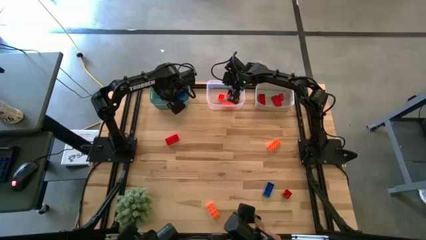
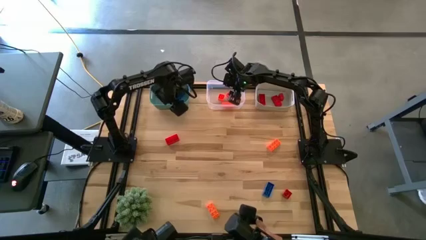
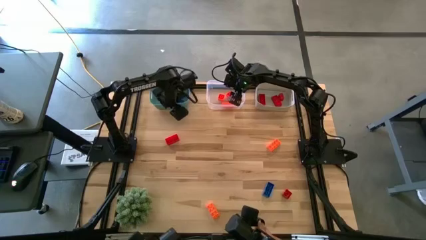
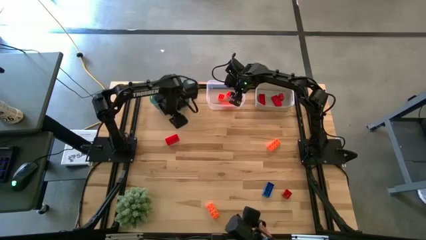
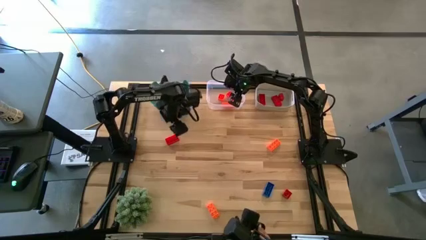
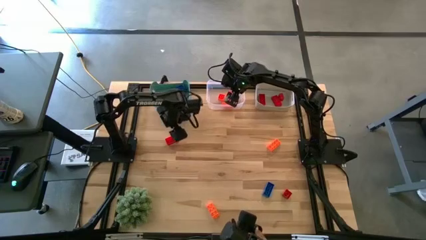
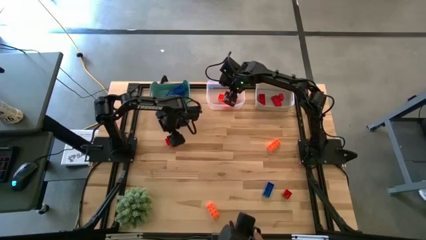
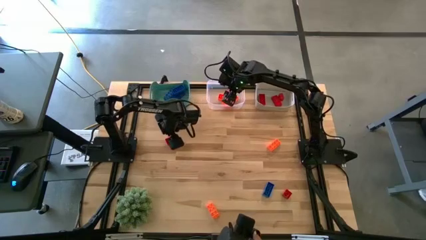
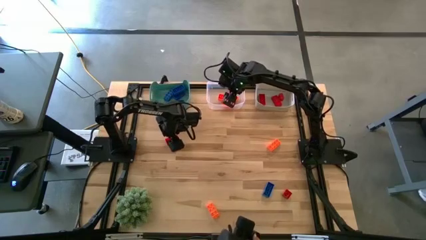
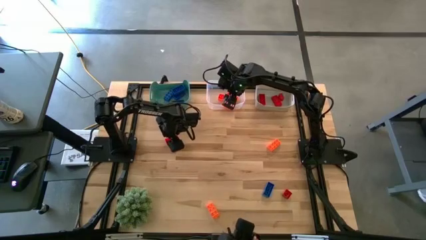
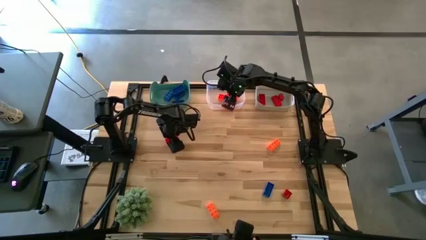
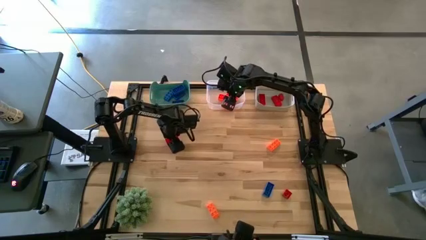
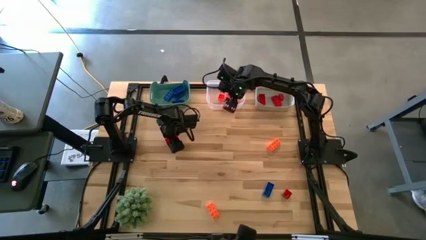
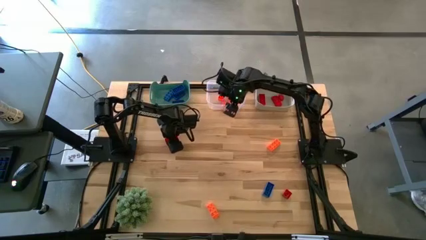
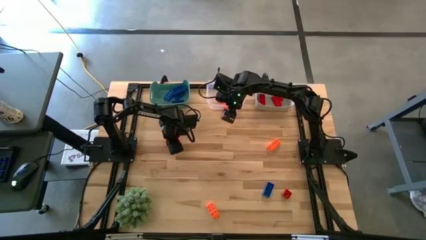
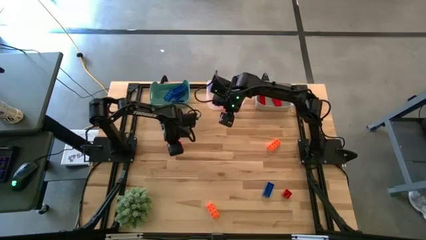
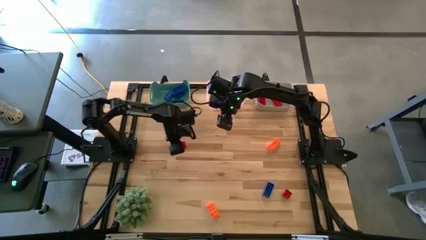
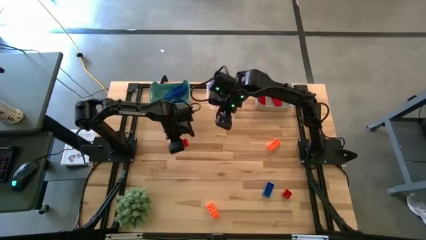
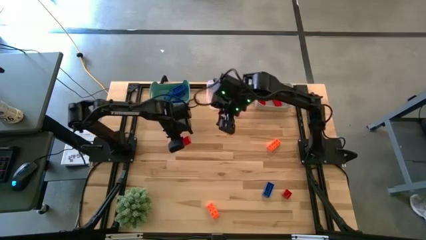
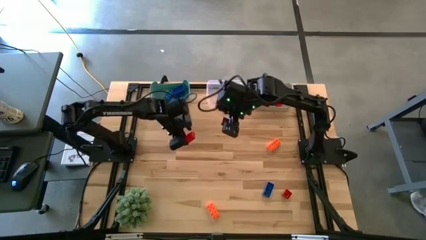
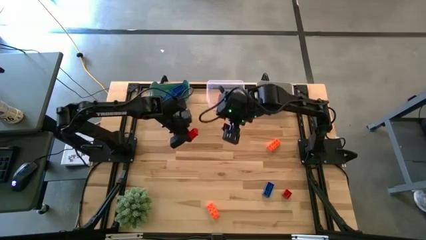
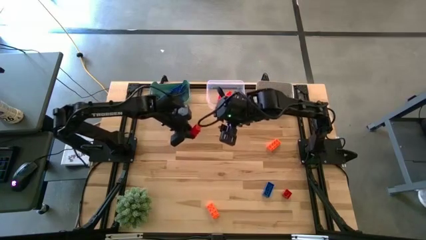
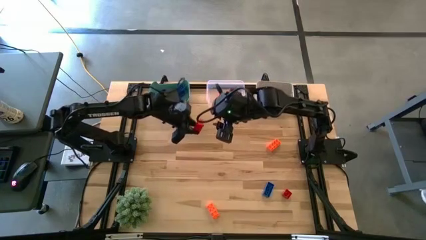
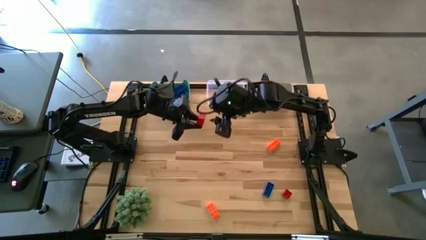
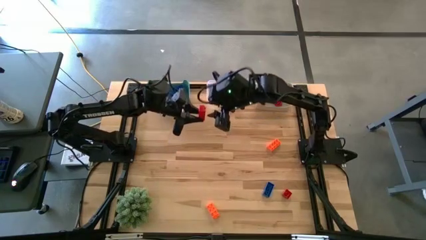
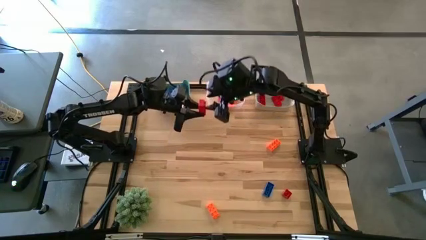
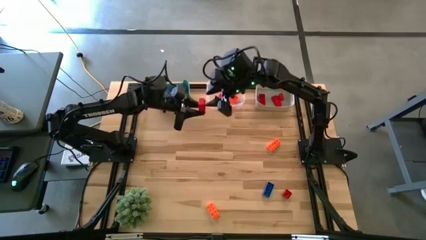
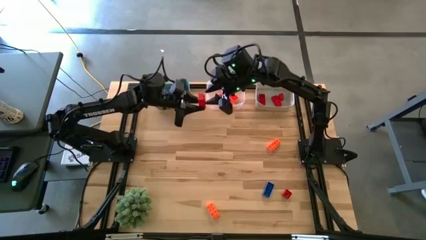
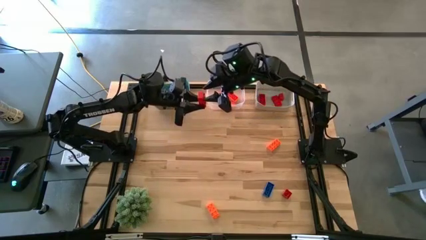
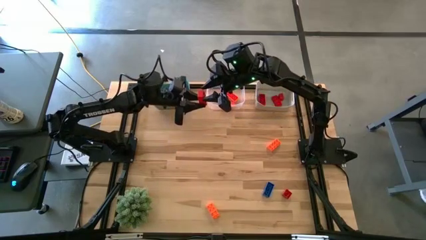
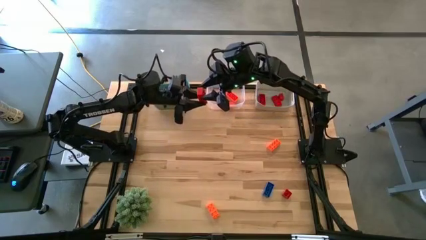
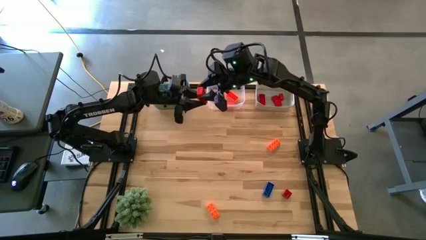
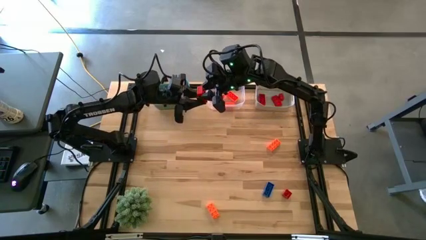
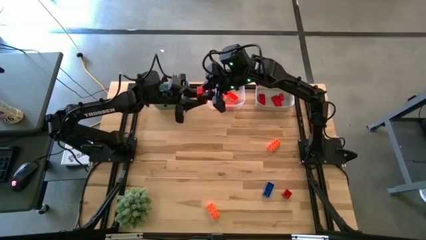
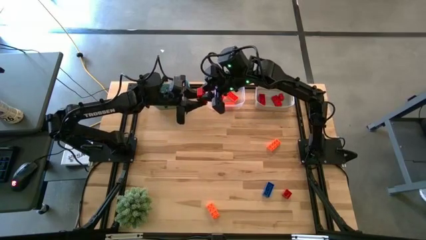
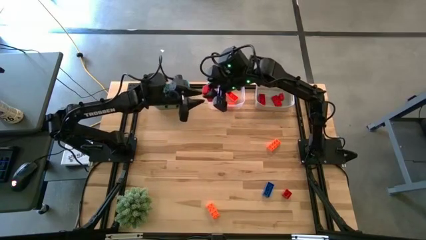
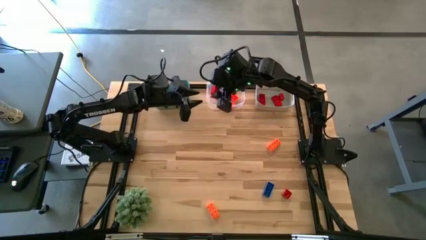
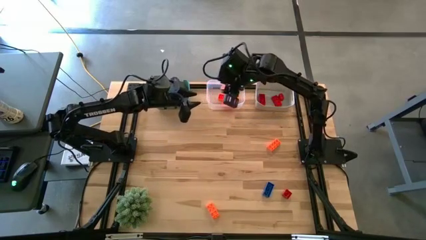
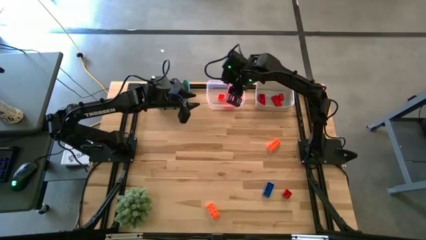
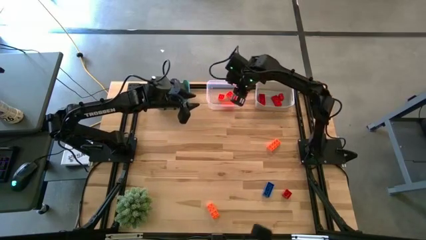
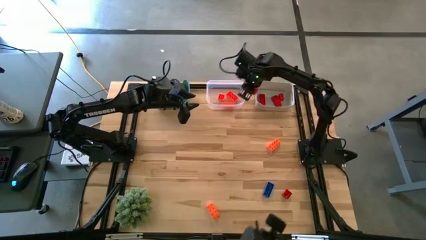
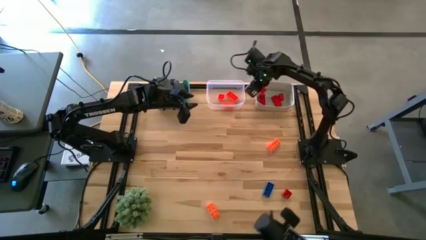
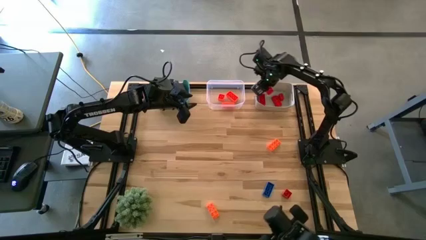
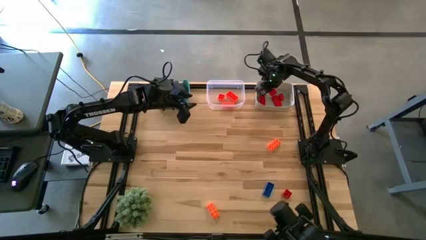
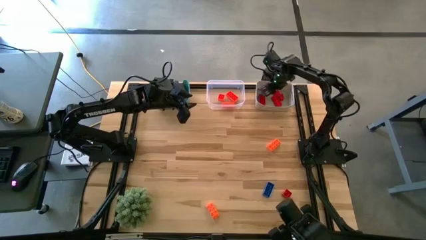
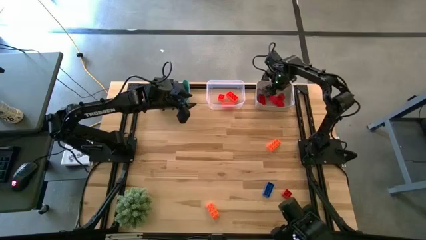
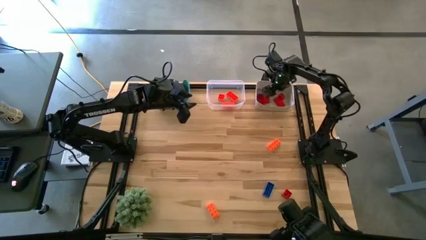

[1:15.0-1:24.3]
Task: Sort & place blocks by color
Put the red game piece into the gray bin

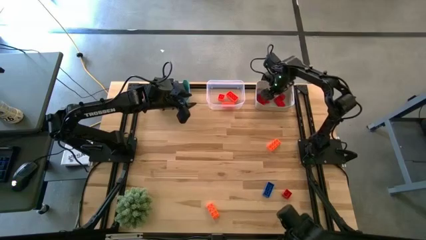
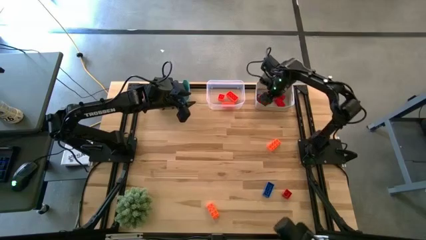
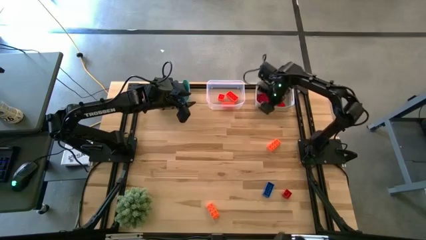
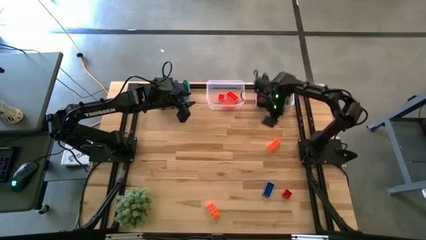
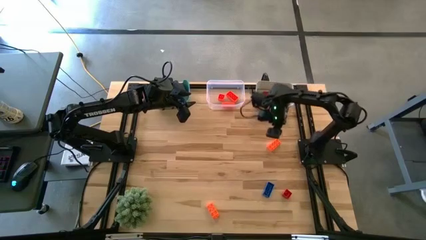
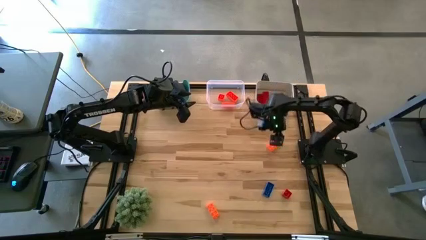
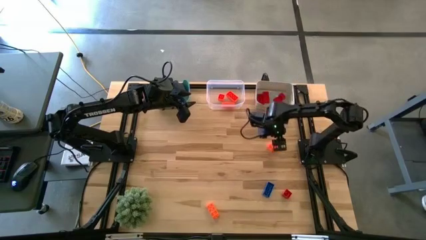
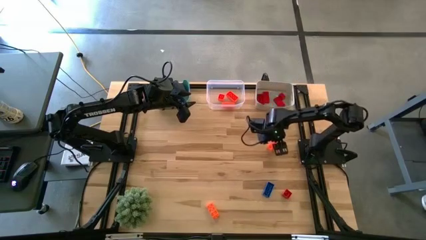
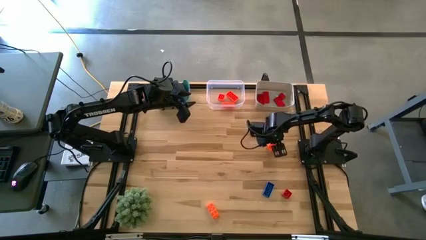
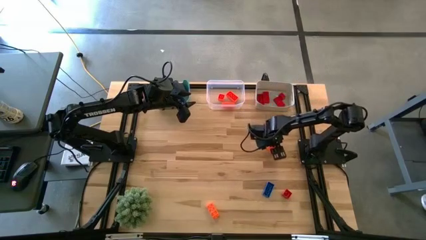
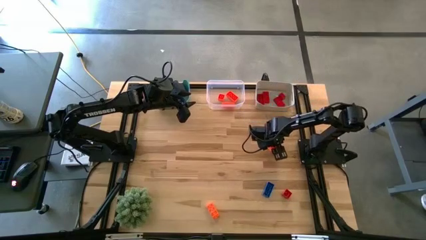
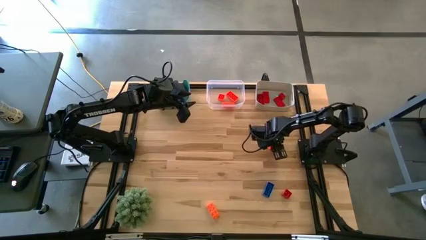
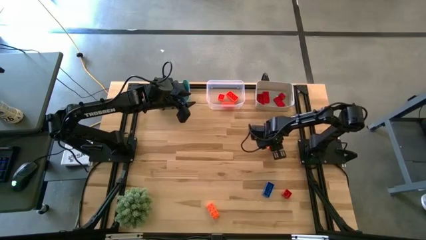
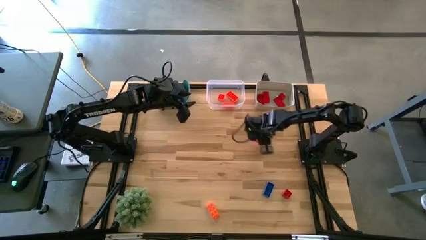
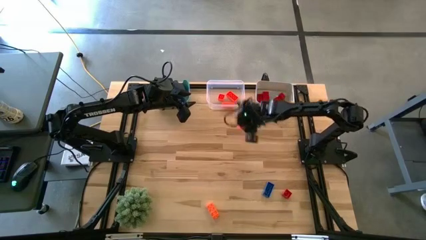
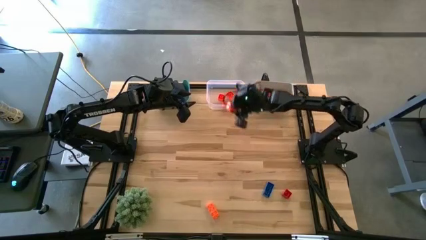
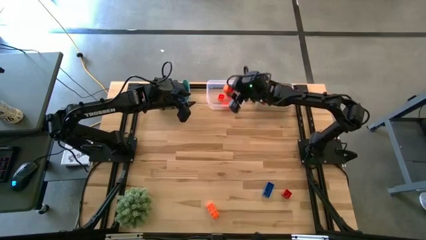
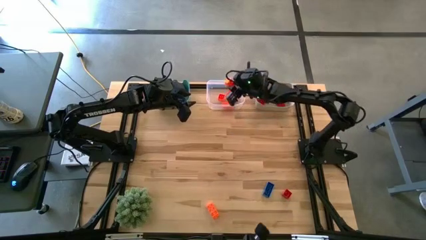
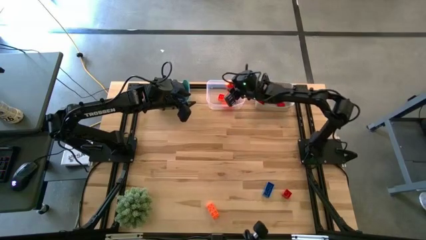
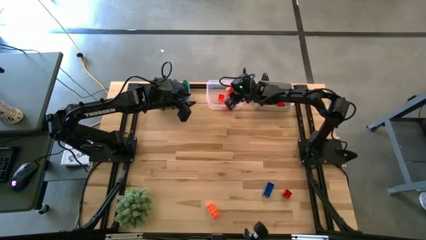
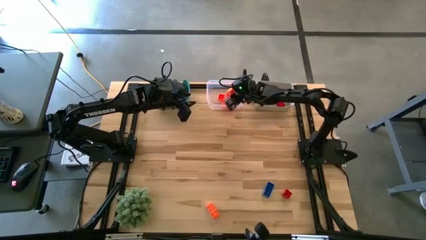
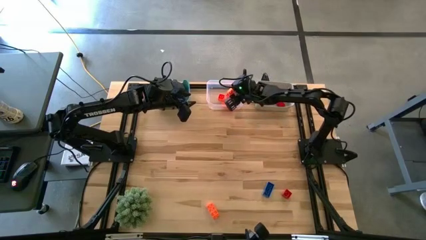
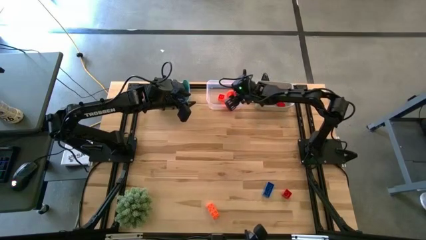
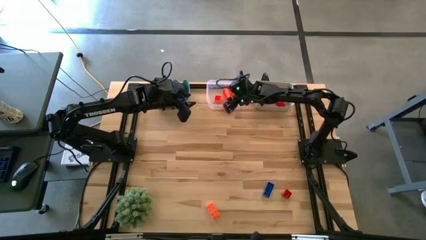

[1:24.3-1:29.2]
Put the orange game piece into the transparent bin

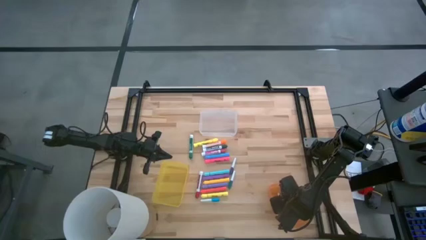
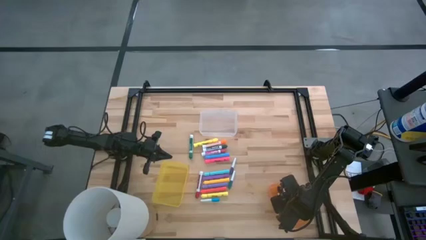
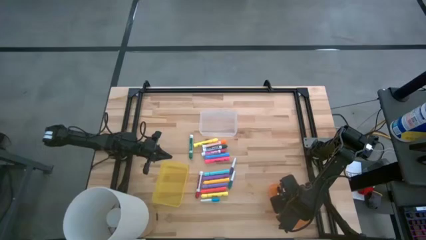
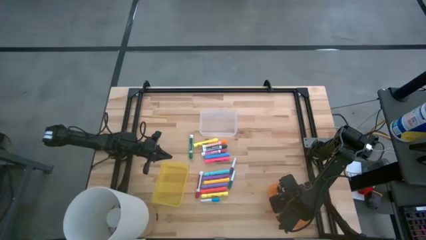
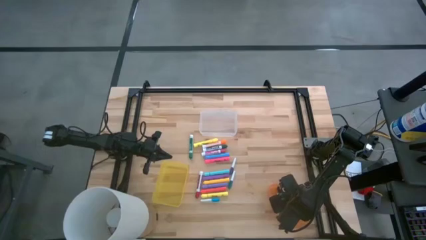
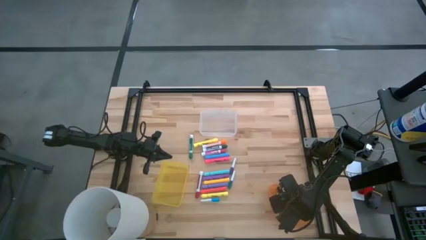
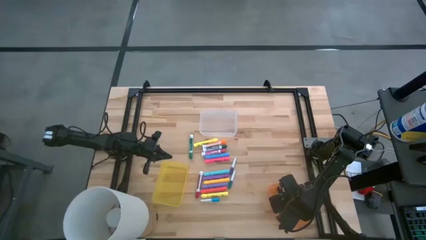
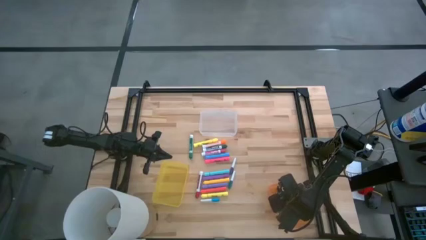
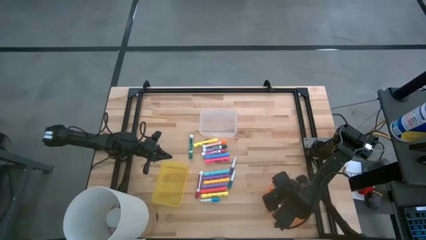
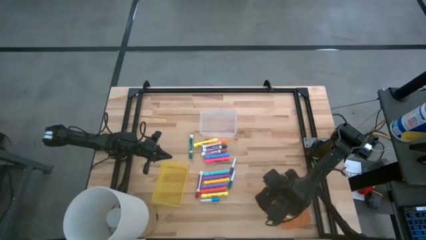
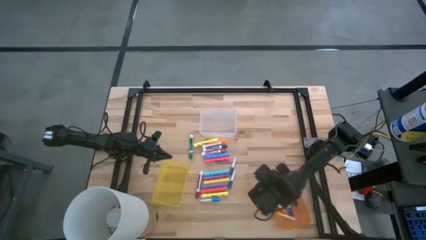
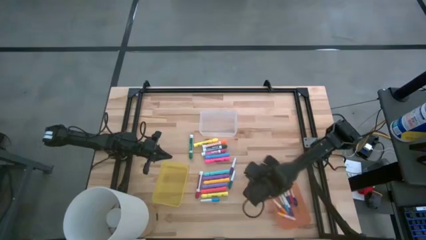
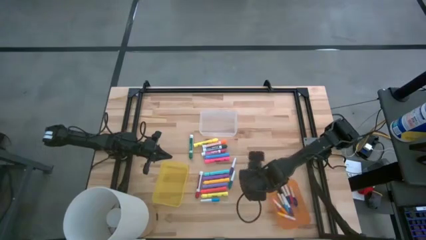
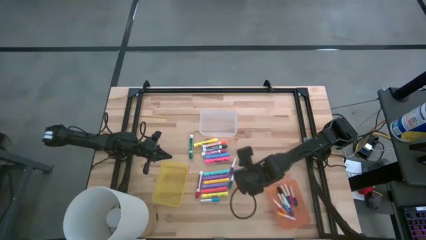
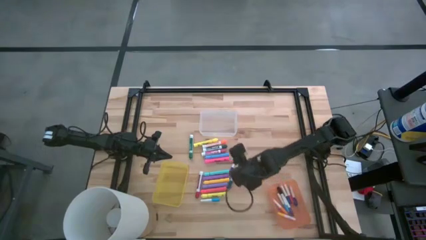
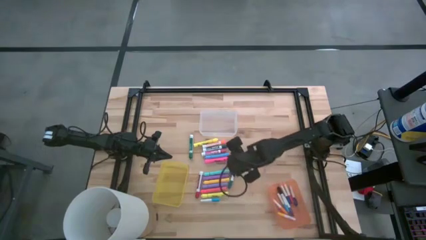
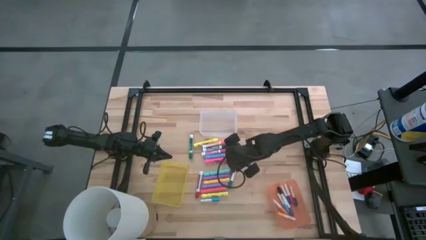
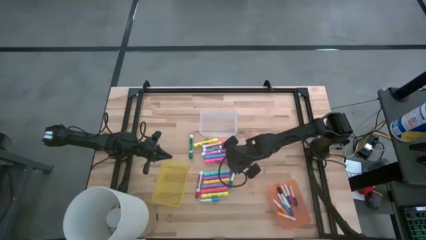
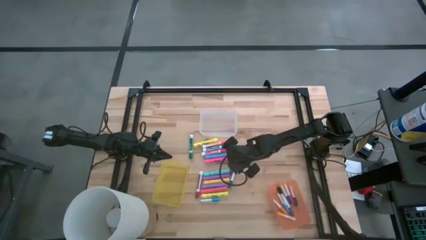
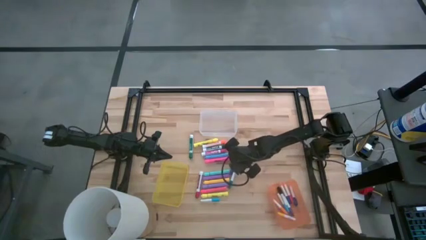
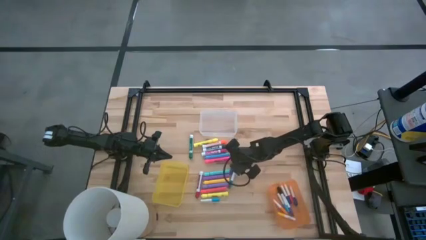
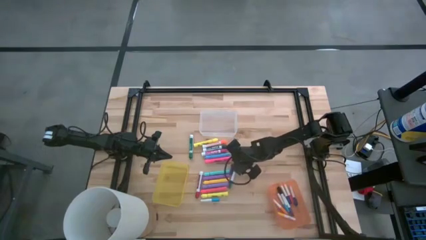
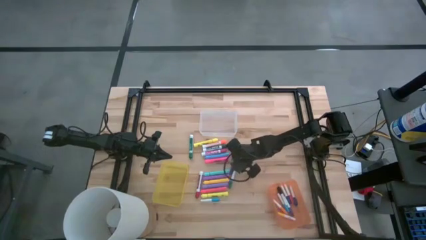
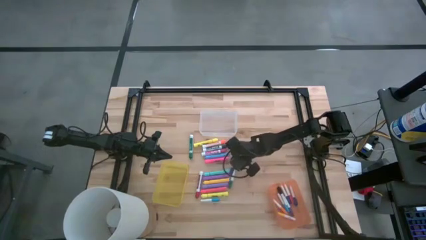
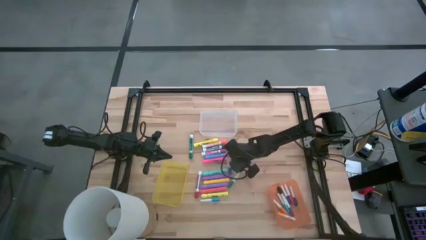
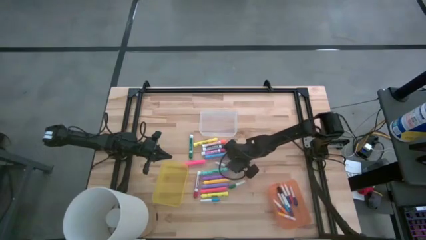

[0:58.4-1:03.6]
Task: Pick & Place Markers
Put the small purple highlighter pen into the orange bin
